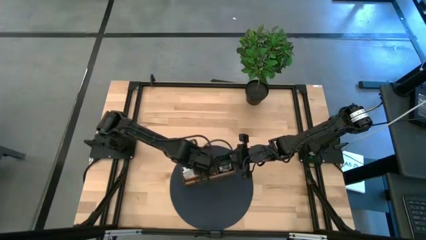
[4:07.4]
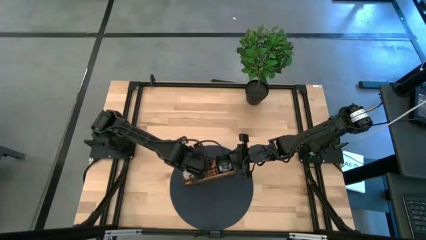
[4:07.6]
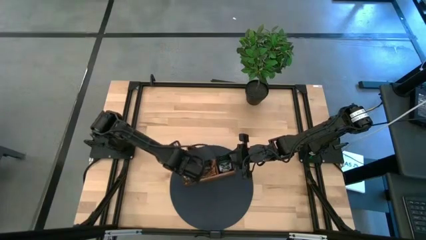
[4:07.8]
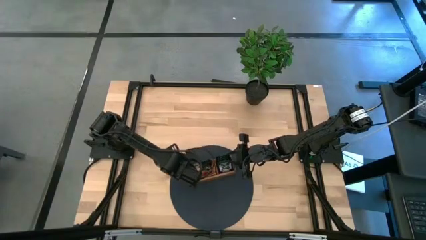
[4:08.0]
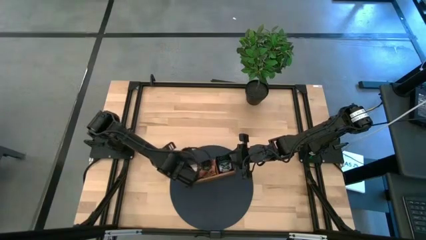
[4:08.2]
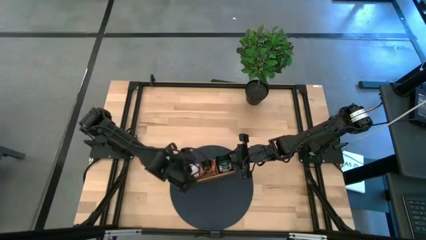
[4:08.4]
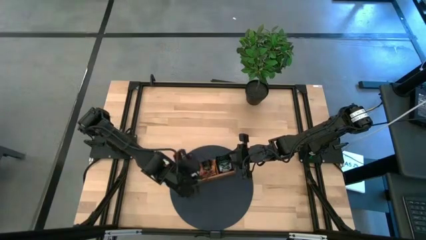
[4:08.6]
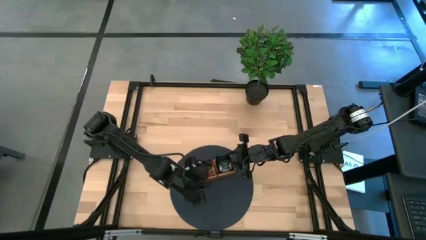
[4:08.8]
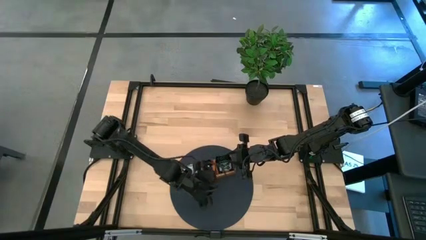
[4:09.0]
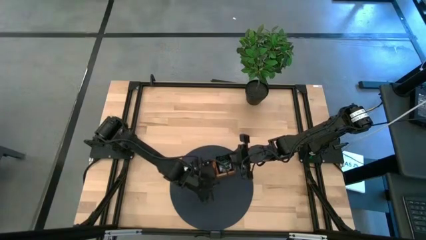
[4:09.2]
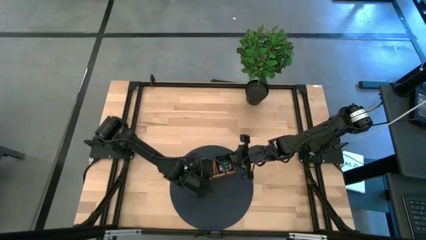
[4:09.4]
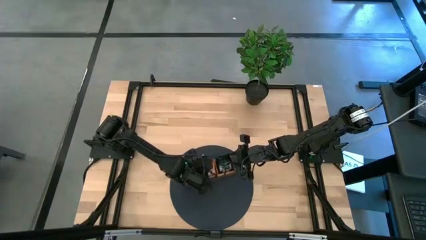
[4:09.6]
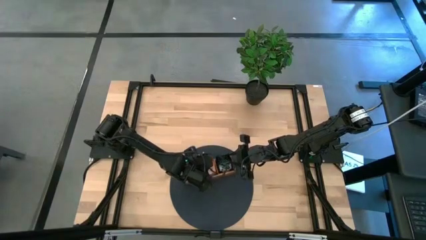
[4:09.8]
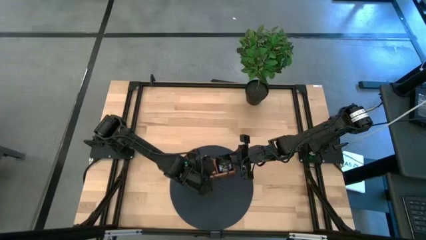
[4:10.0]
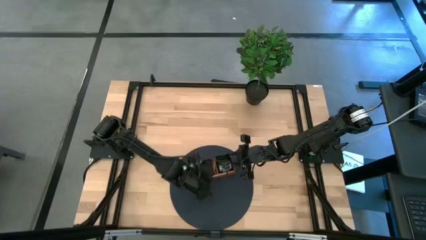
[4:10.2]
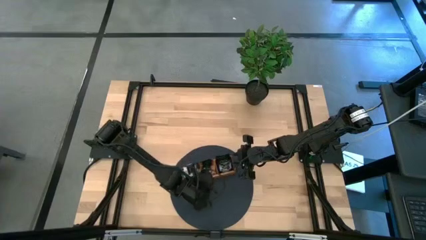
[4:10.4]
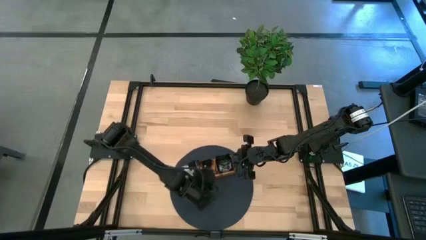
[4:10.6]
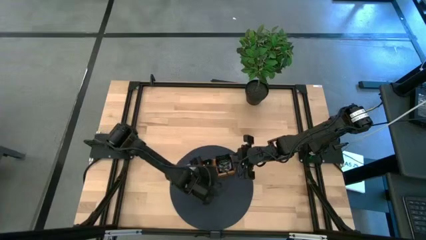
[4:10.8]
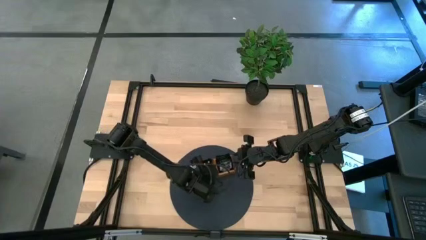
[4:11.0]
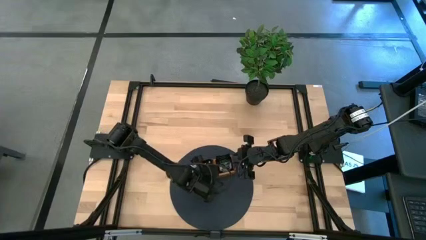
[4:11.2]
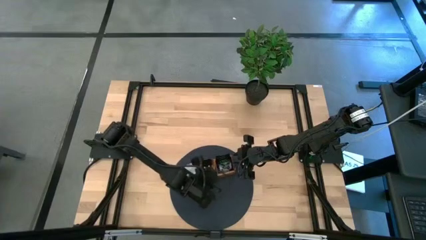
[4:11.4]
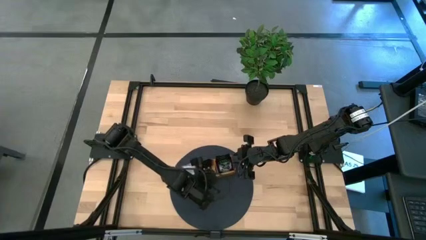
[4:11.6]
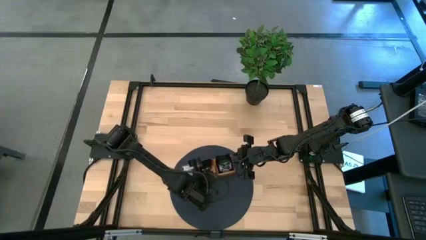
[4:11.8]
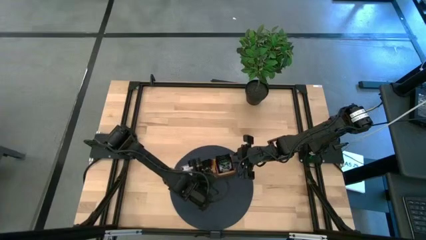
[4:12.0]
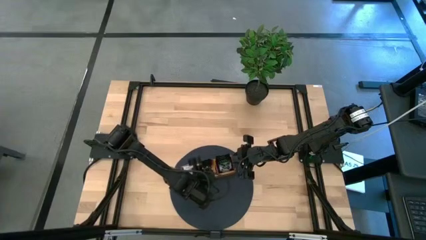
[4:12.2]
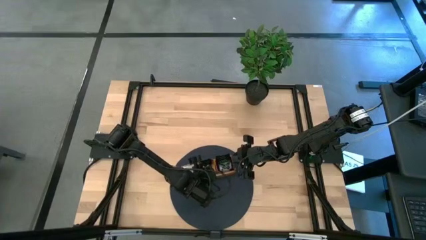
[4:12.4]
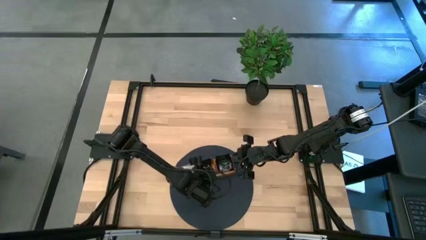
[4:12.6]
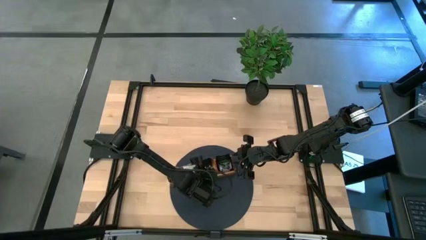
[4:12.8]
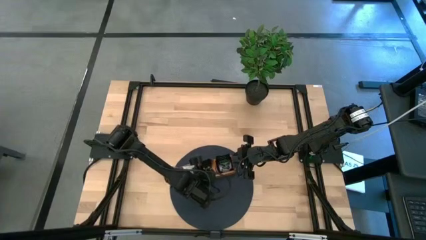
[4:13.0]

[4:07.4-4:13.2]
Task: Pick & Place Tea
Adjust the tea bags in the wooden organizer

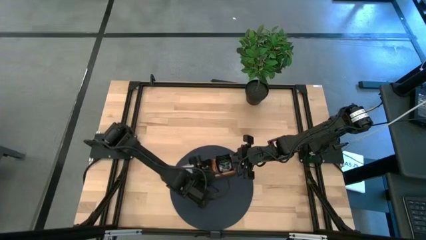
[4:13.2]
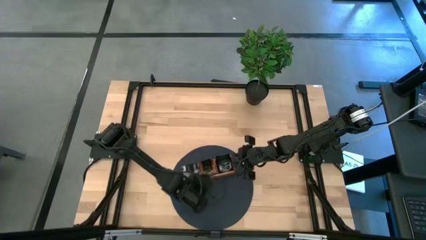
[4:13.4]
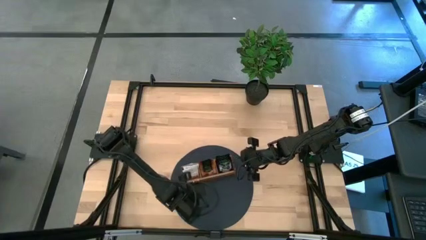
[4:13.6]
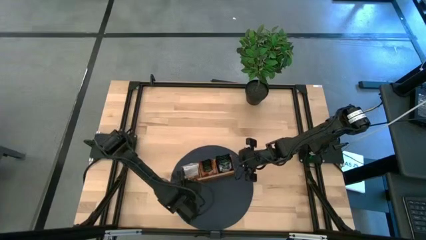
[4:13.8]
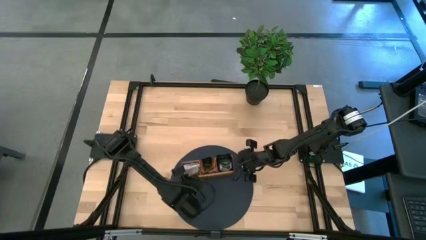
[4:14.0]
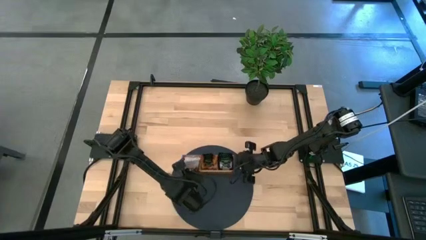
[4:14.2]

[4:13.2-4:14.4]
Adjust the wooden organizer

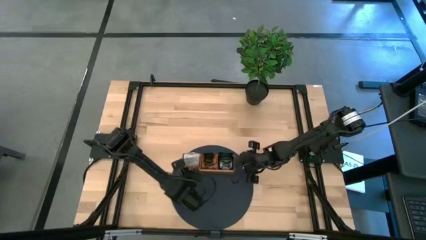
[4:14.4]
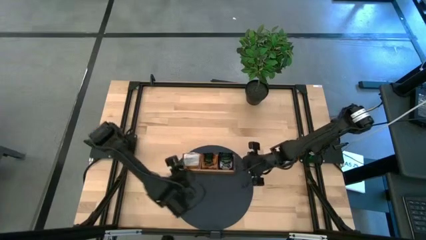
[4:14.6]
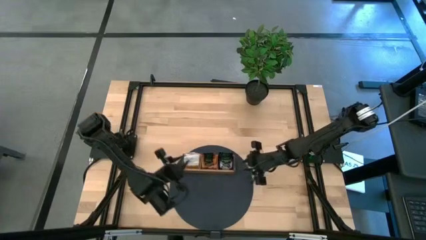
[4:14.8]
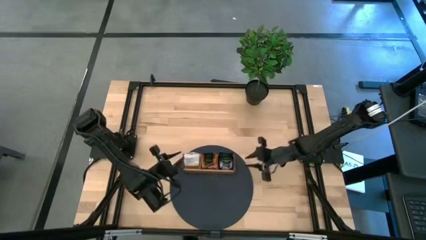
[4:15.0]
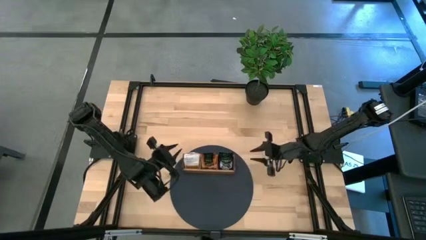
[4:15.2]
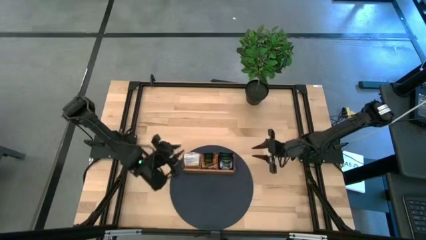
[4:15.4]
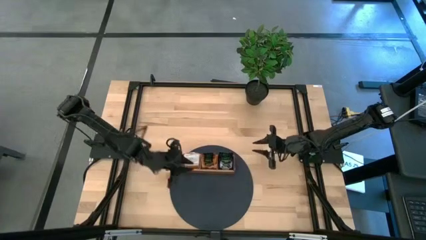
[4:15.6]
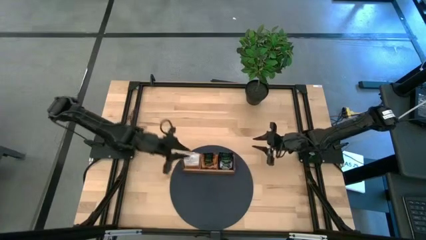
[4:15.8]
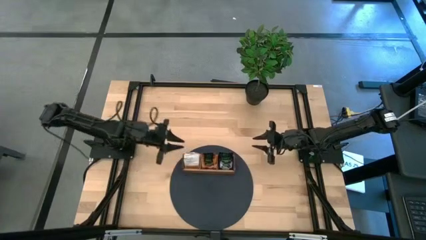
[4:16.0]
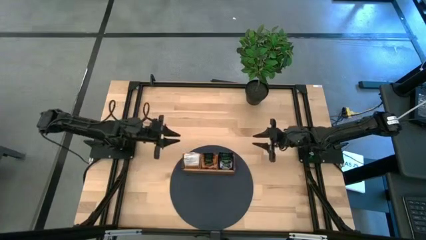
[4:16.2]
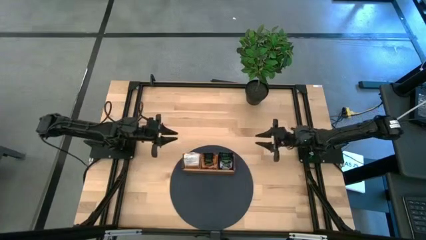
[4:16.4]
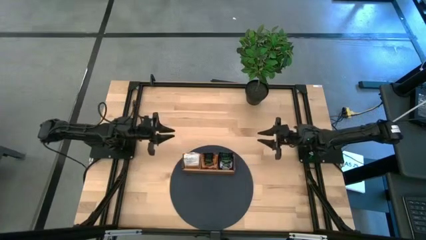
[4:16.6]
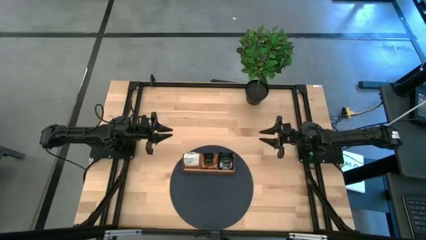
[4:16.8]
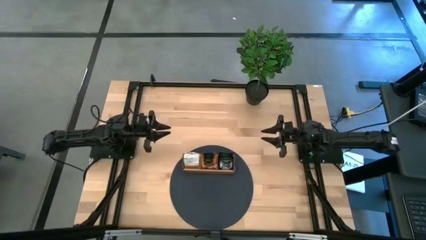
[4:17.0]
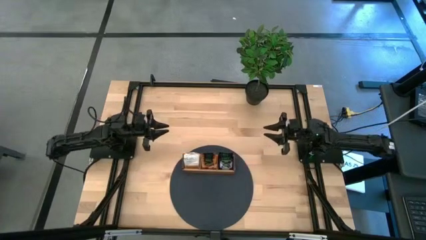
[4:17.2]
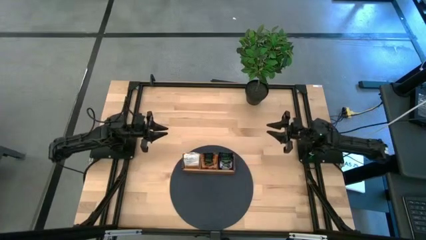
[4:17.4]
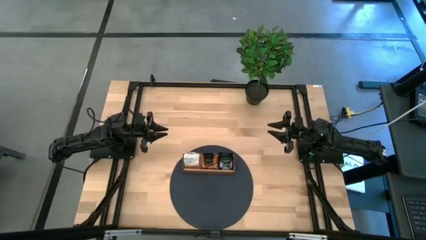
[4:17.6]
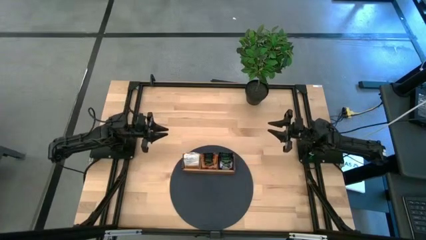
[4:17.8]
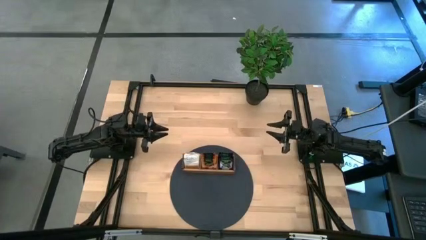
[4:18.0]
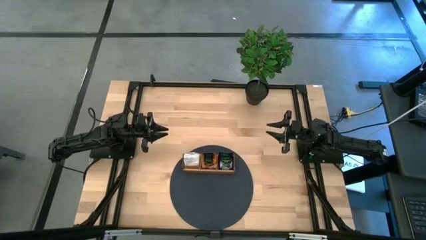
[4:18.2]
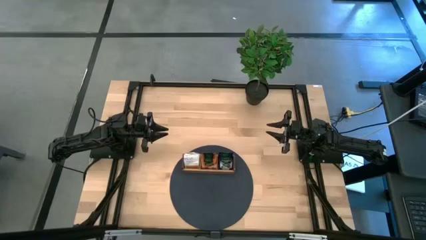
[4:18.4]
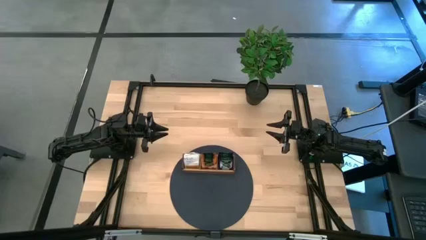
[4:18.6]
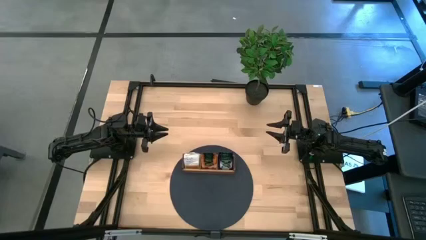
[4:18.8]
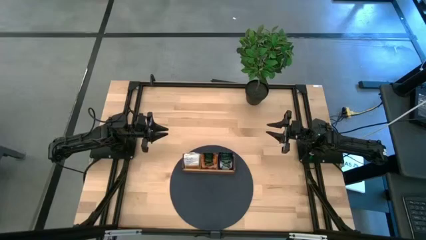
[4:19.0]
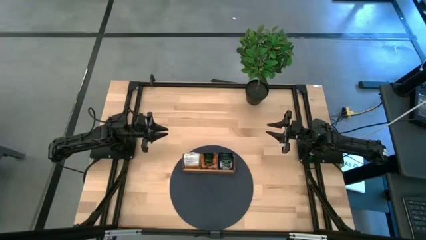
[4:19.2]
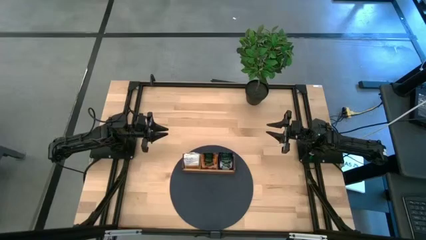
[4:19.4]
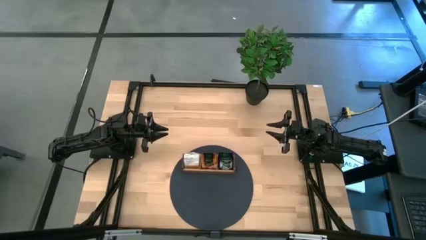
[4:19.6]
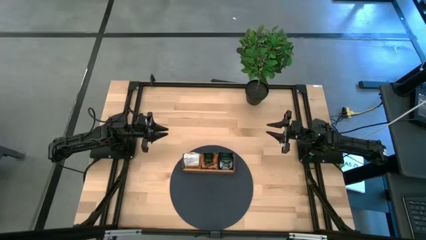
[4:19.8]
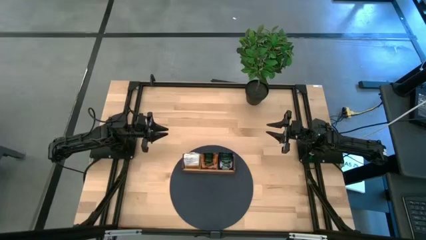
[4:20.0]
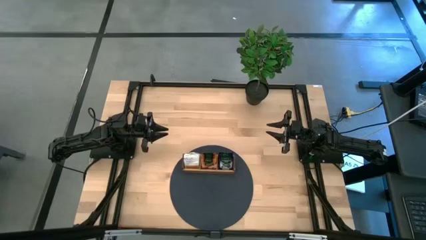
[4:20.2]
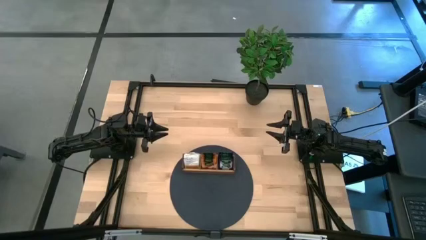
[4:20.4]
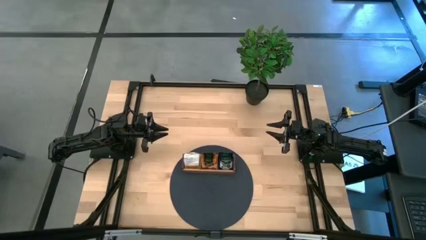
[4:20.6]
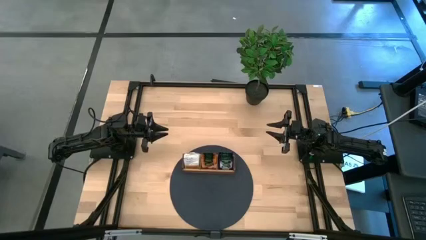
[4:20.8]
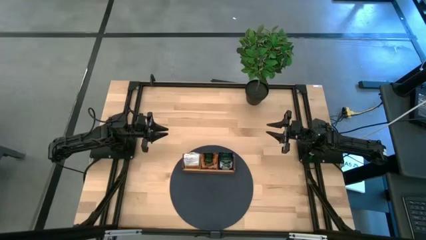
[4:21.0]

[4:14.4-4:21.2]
Return to Home Position

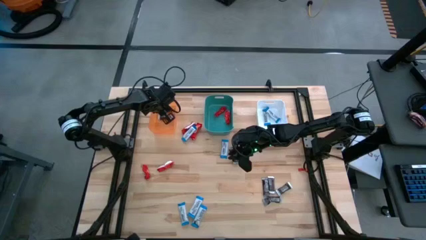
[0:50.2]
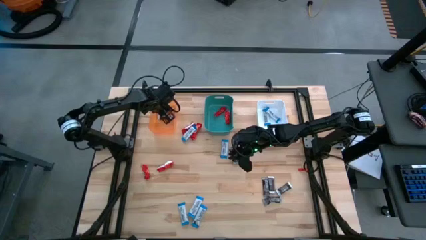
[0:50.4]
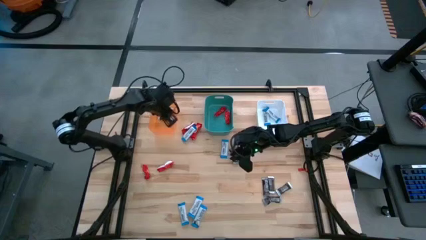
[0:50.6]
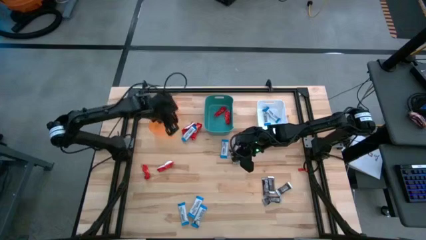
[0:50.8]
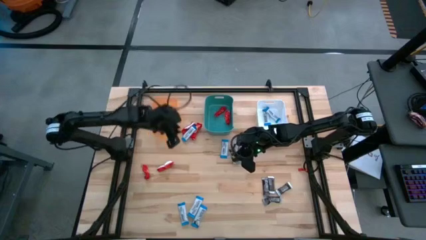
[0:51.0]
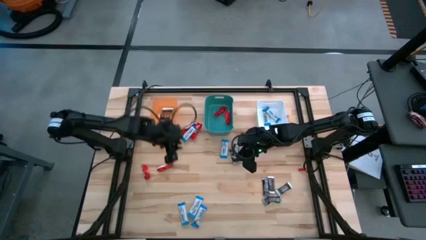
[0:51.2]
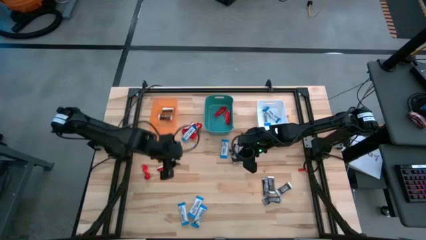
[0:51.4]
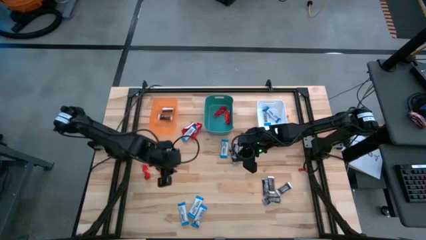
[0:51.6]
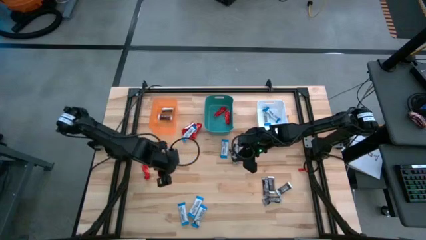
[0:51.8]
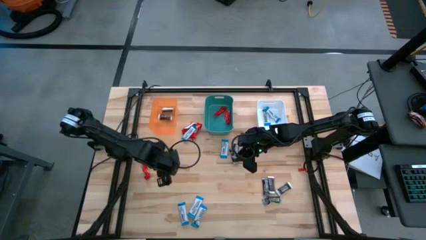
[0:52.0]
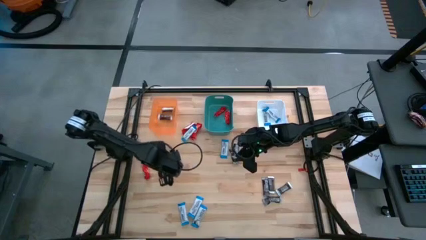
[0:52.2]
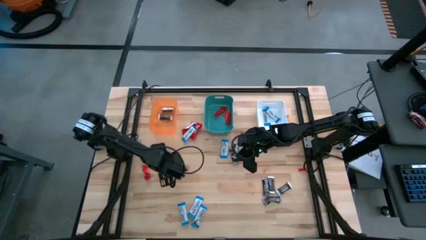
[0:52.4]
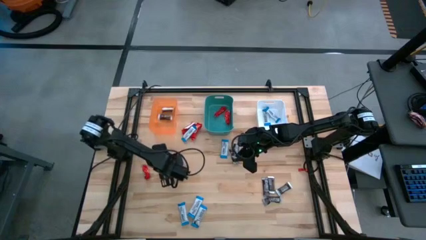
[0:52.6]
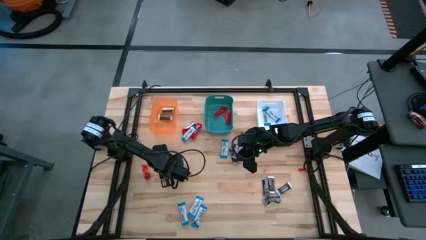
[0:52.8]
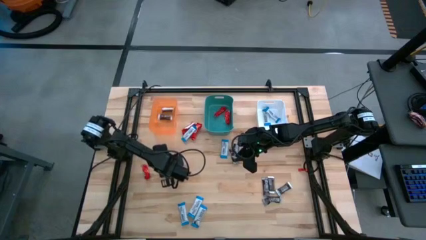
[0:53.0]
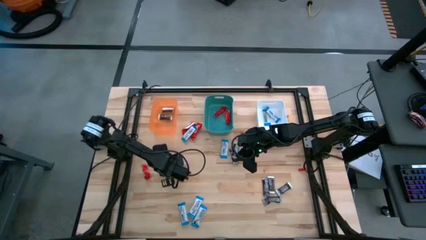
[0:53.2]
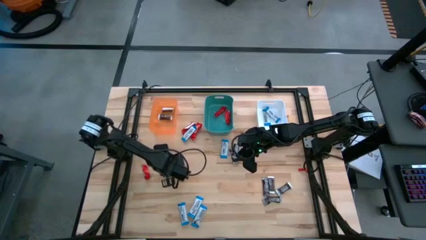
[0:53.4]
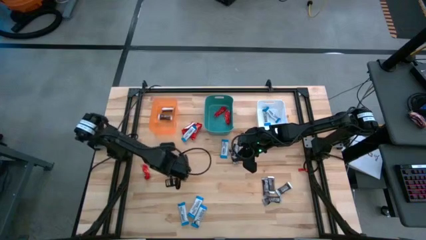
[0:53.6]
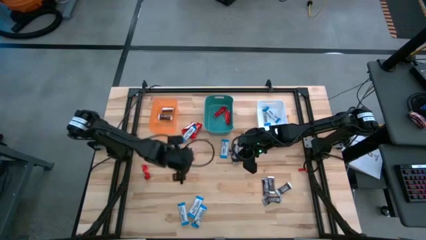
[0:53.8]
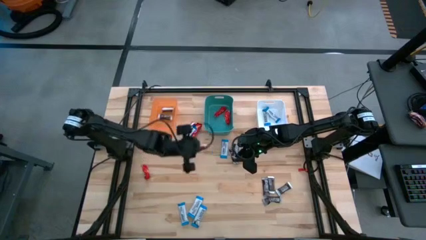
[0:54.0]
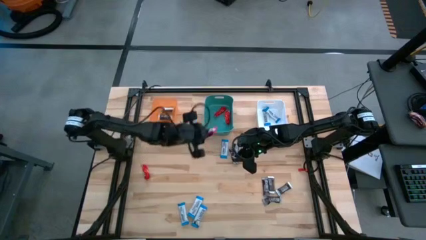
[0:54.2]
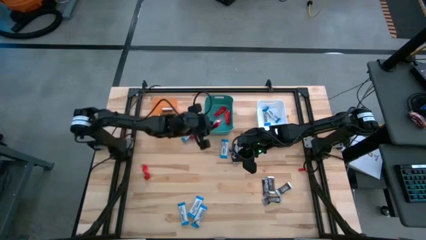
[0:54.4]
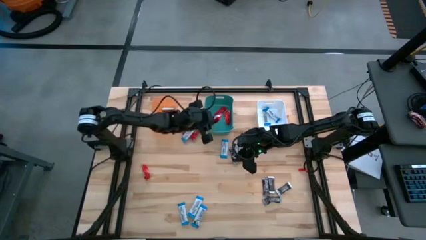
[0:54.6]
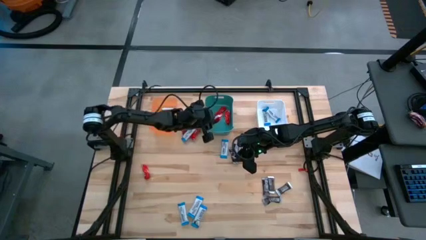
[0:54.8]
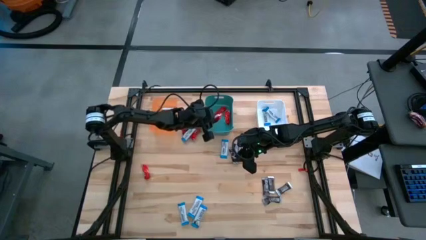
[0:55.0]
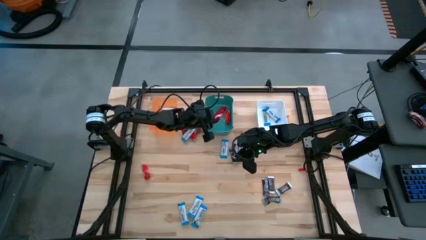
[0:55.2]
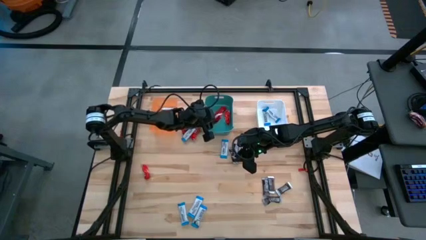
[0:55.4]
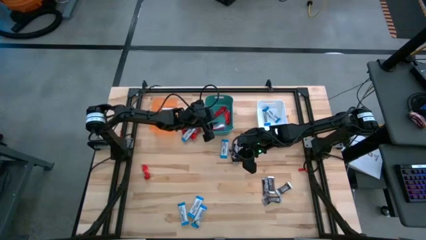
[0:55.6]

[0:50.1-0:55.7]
Task: Organize candy in baskets
Put the red chocolate bar into the green bin
